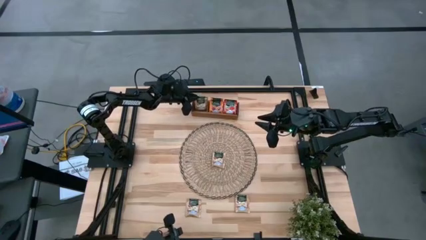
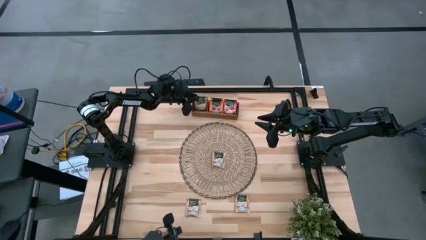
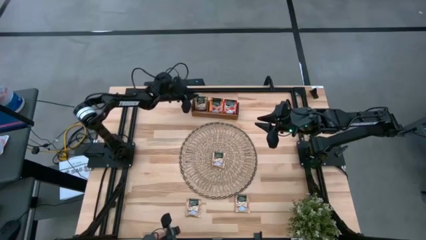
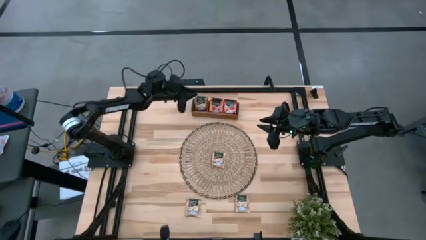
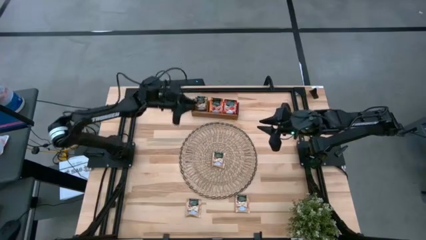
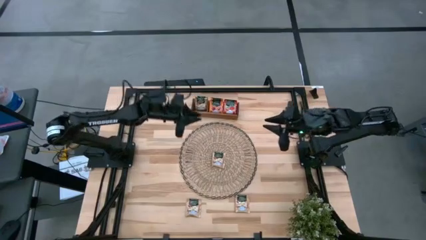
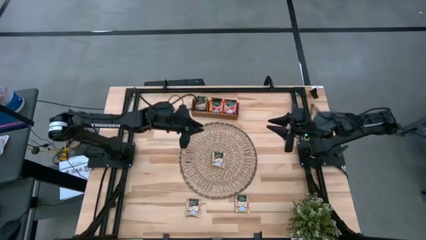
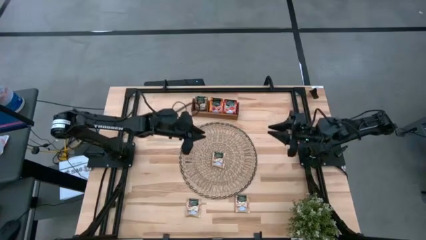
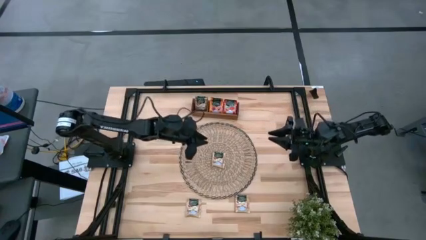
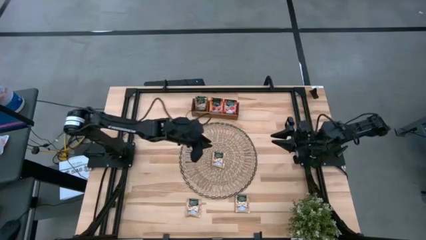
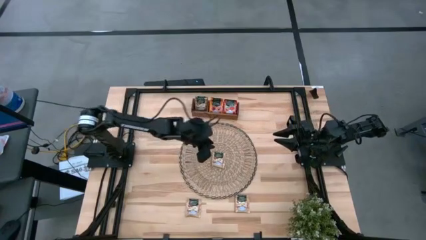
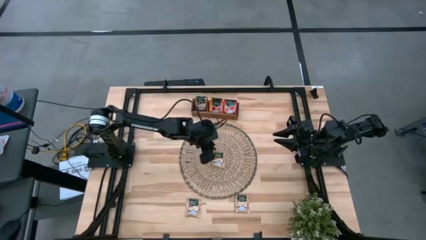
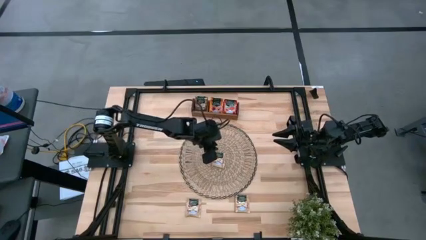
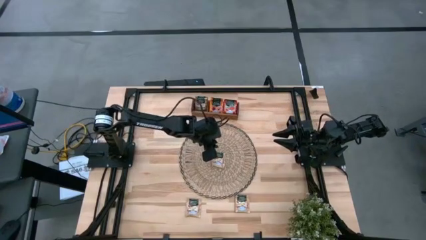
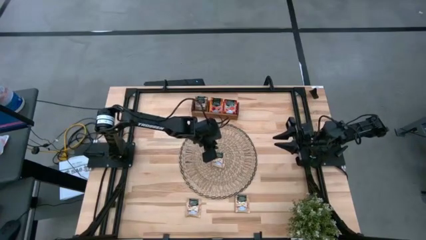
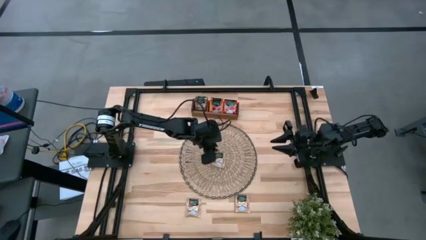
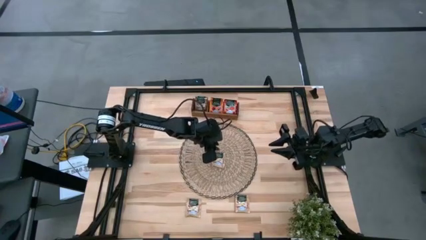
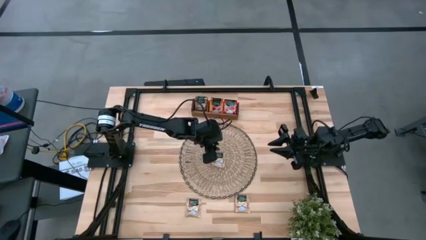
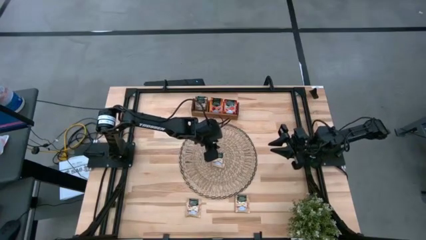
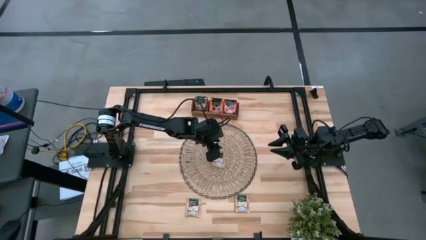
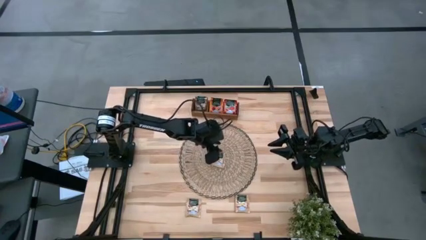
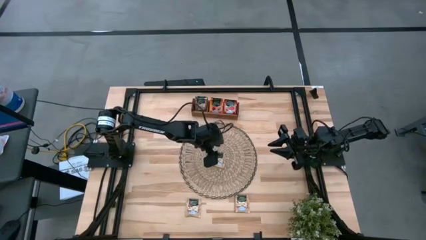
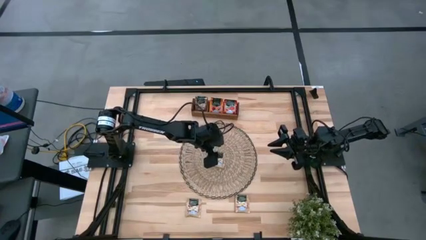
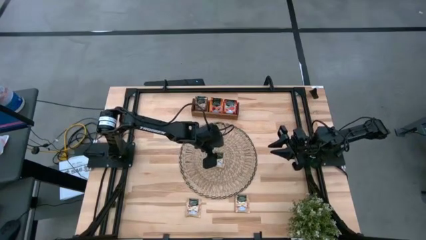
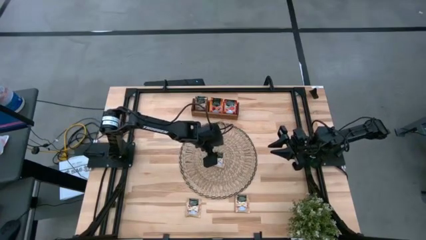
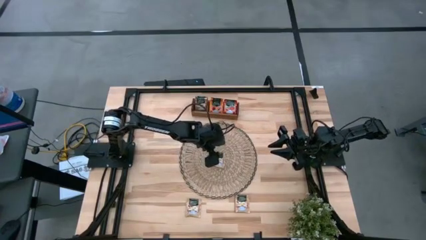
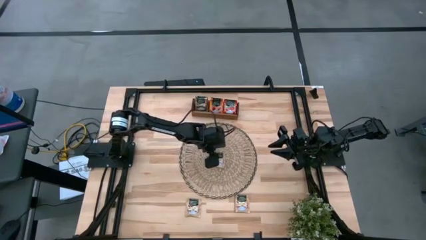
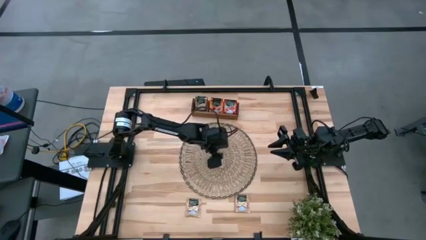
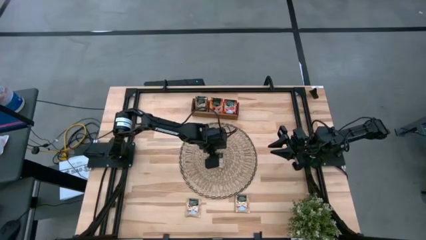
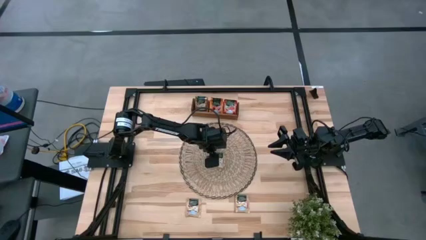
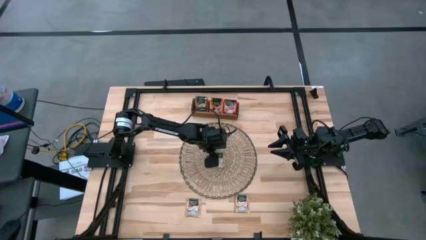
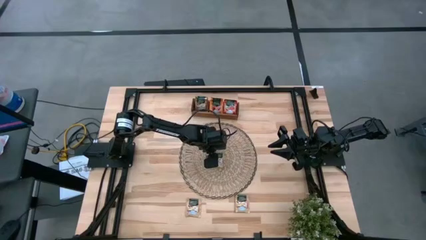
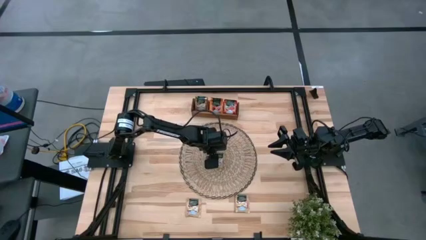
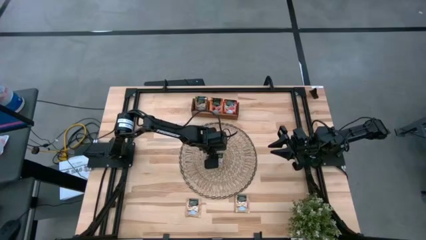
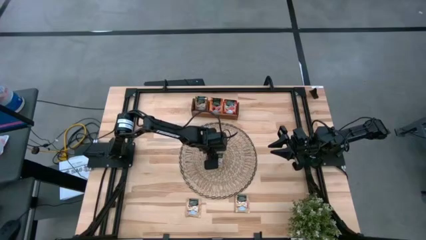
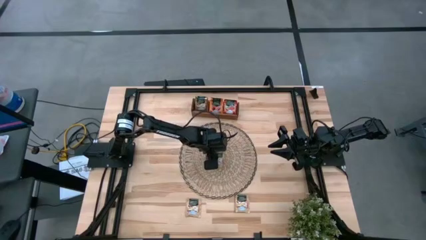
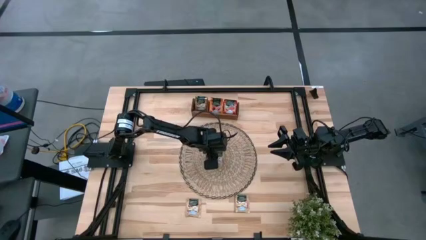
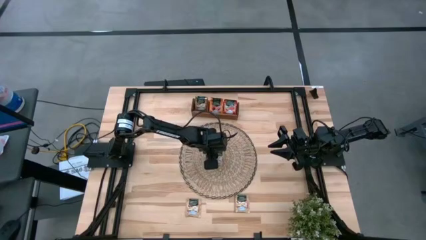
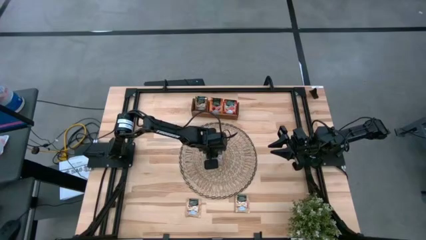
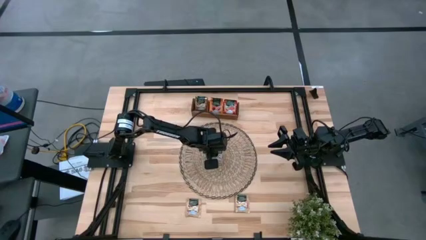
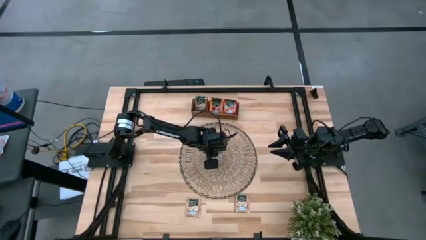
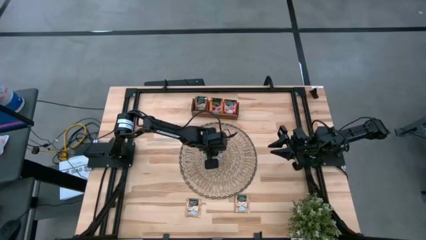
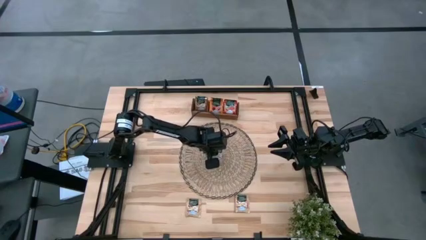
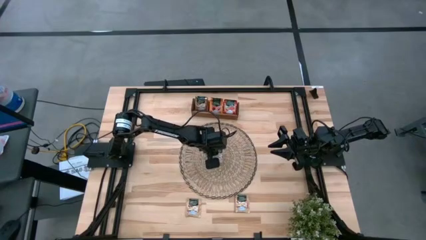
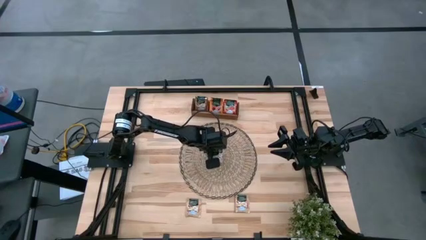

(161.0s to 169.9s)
Task: Pick & Place Tea
Put the brown tea bag into the left section of the wooden organizer

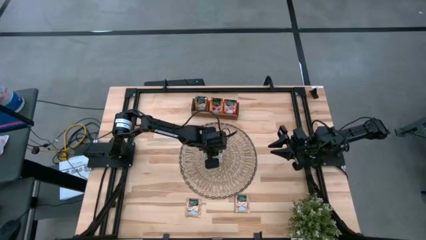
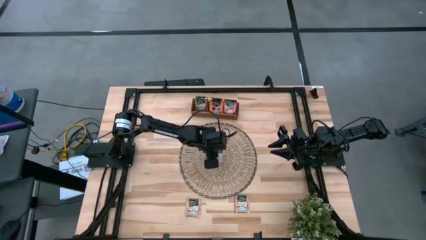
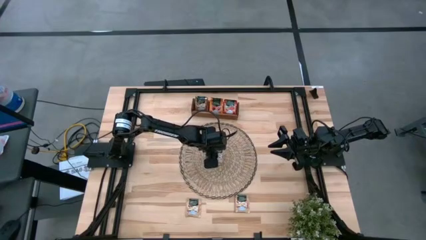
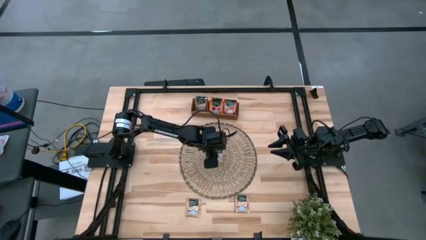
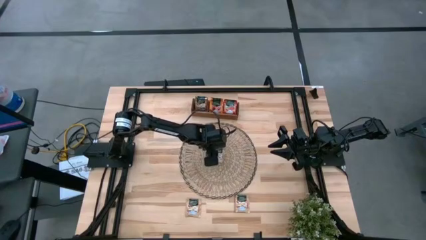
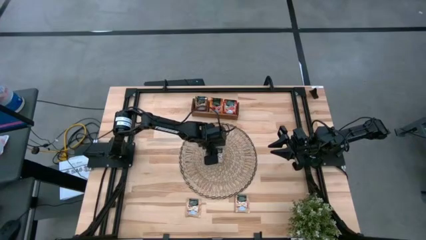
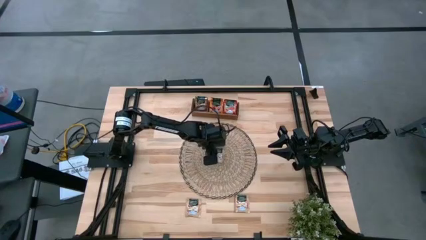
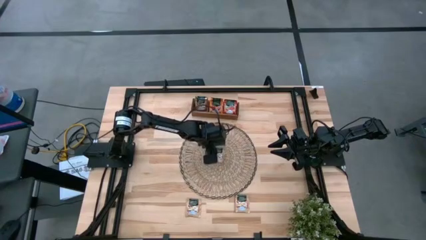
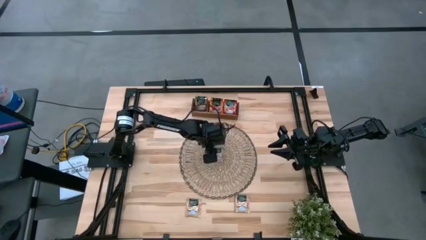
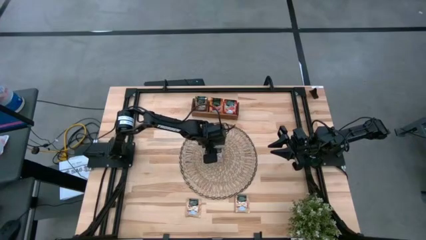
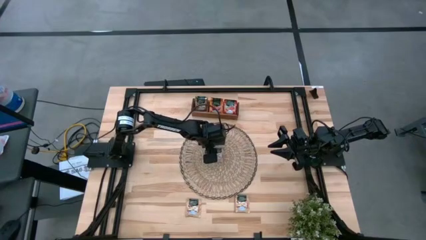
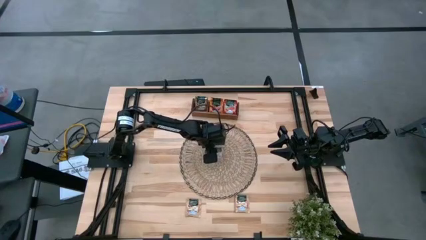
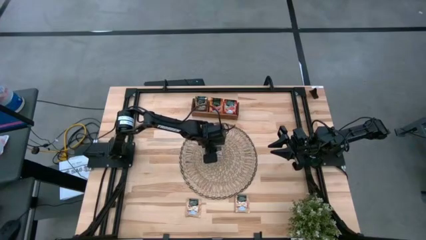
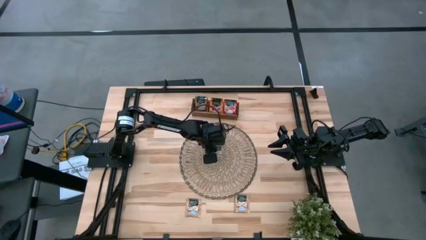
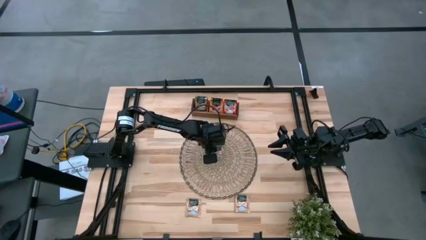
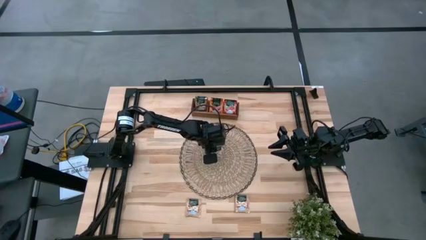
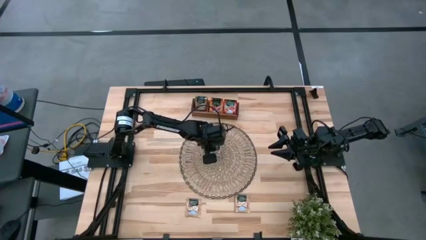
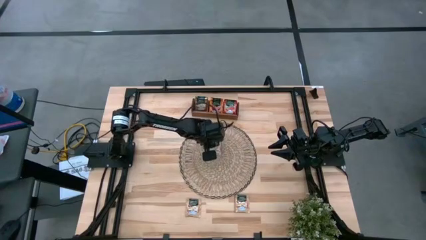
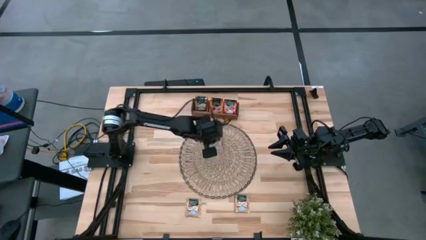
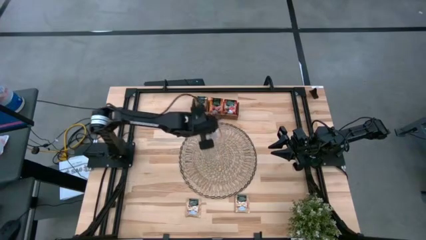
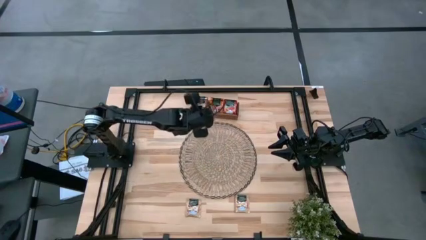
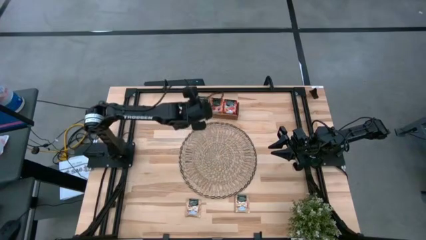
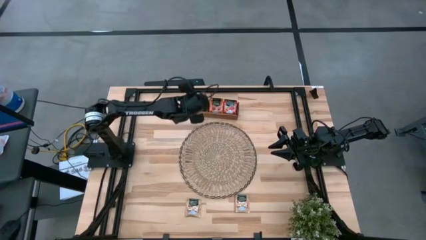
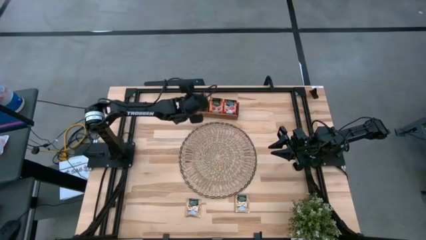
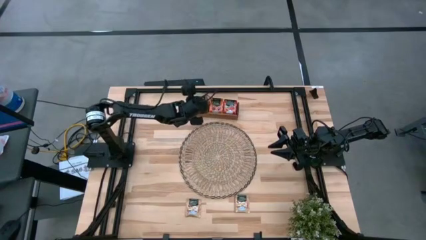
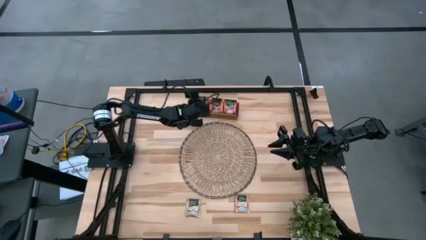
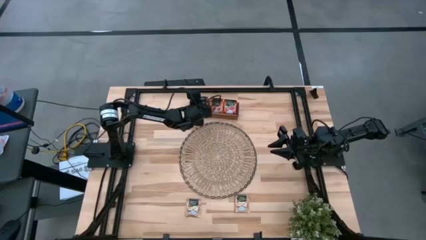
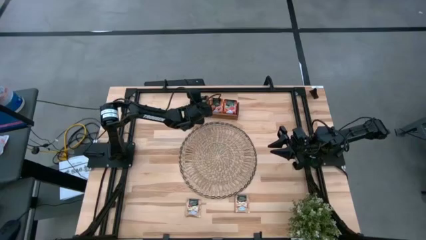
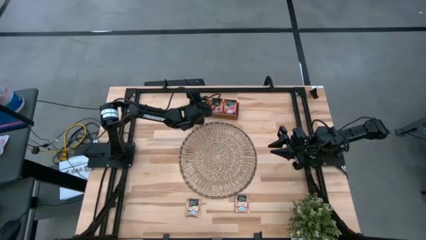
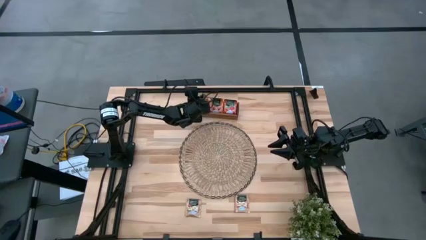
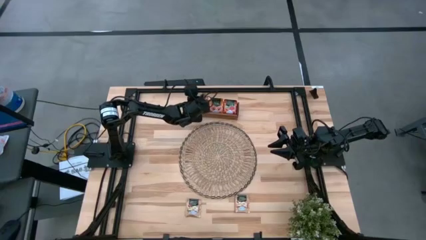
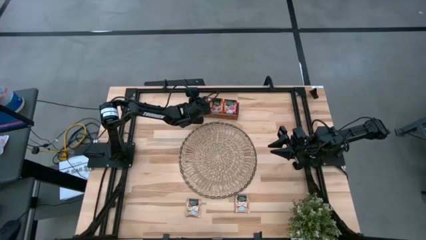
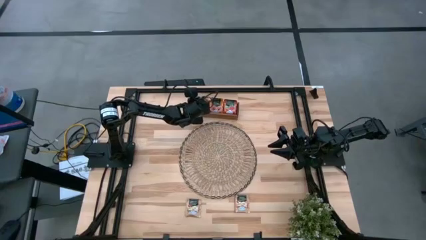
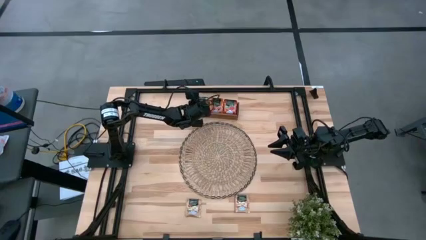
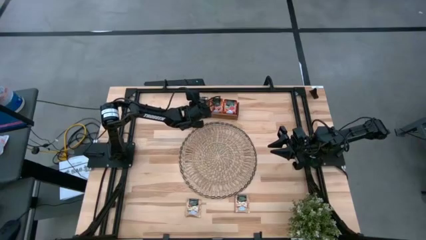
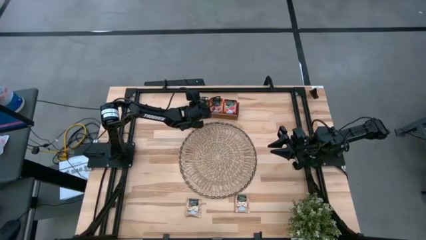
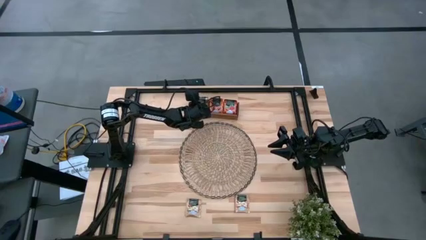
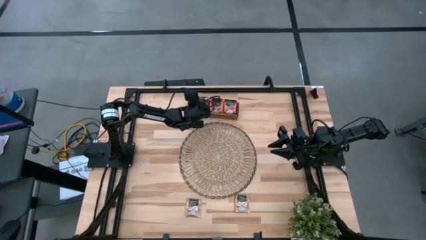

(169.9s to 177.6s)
Put the brown tea bag into the left section of the wooden organizer
